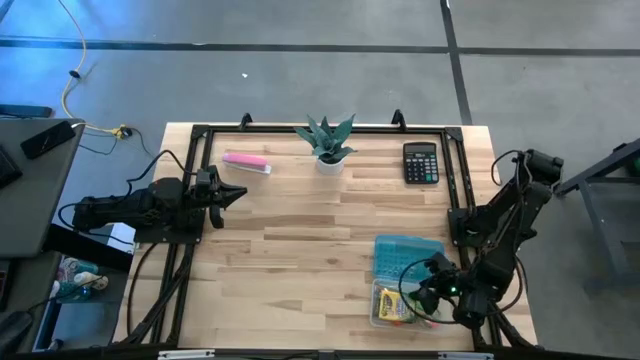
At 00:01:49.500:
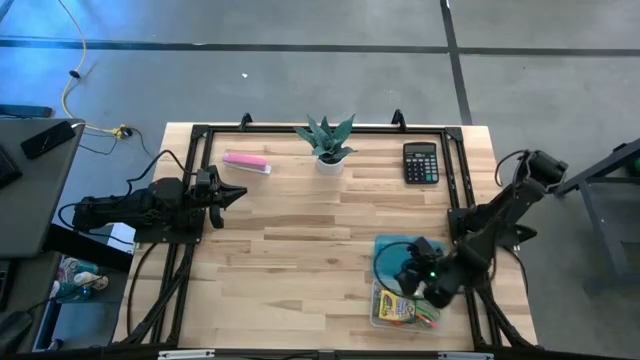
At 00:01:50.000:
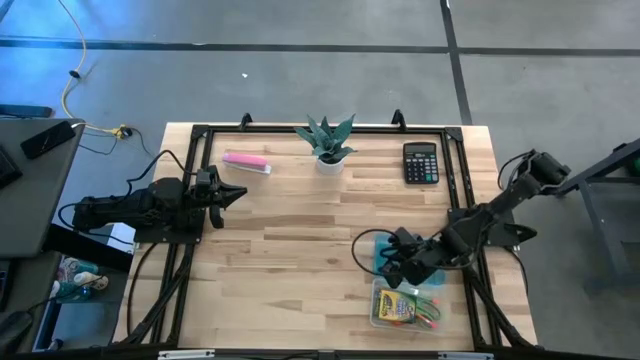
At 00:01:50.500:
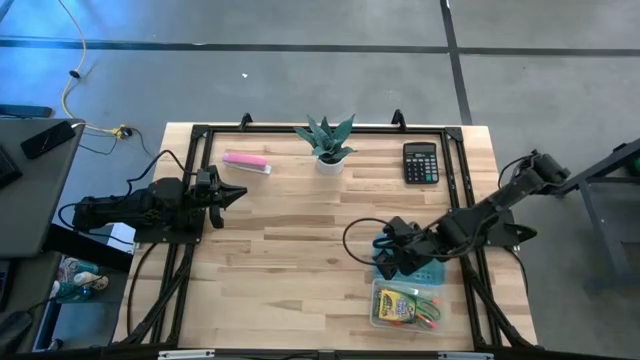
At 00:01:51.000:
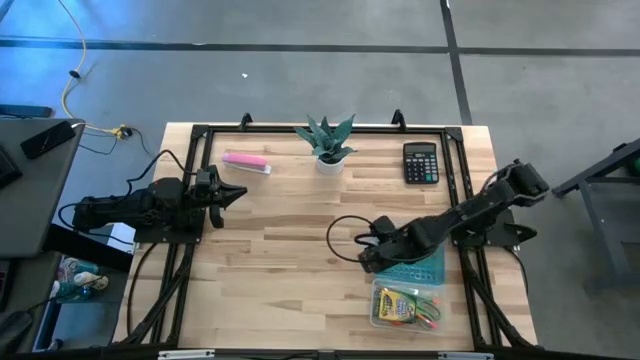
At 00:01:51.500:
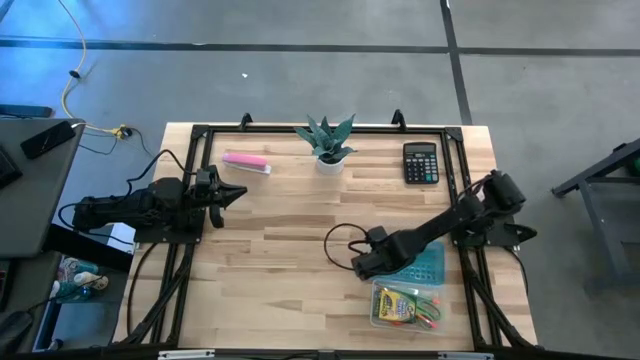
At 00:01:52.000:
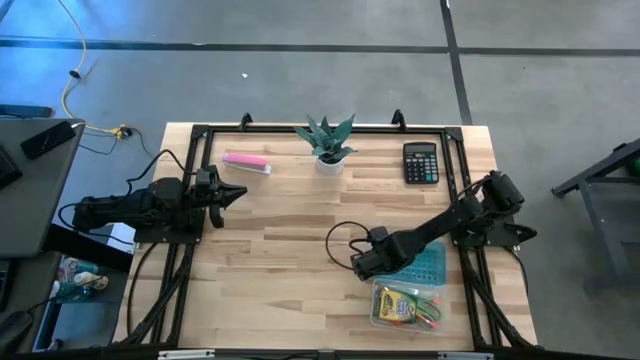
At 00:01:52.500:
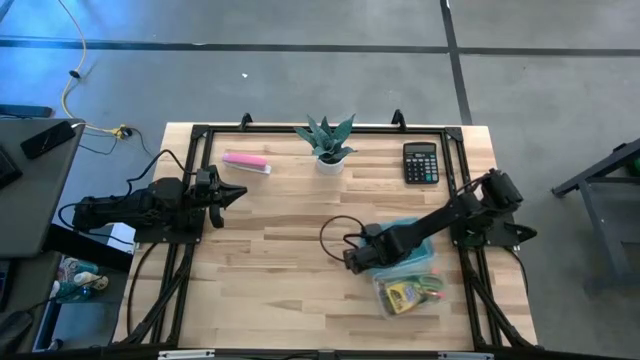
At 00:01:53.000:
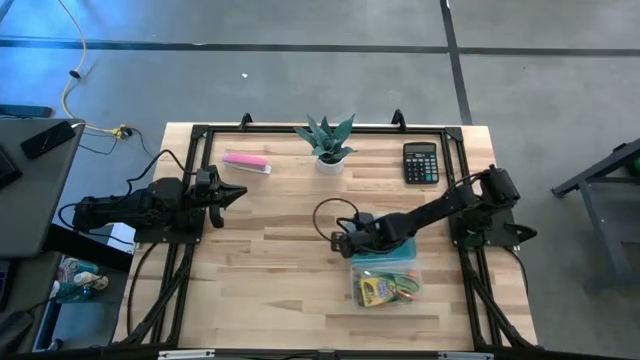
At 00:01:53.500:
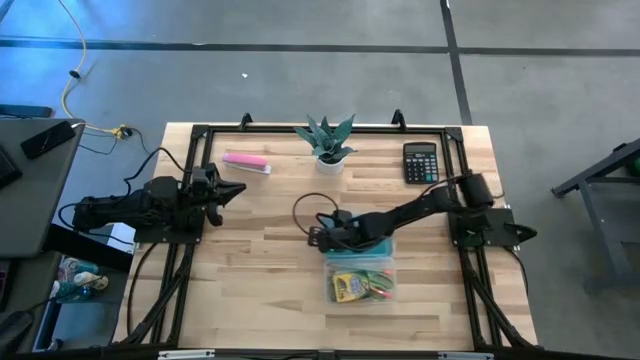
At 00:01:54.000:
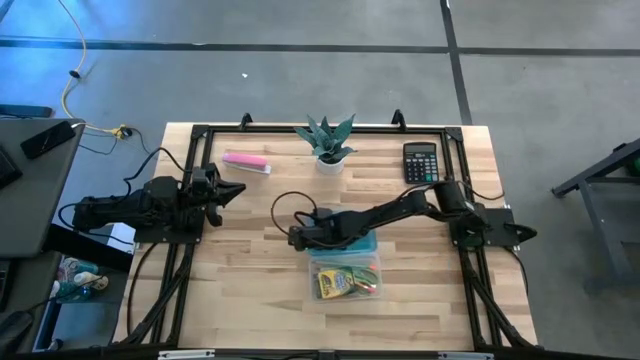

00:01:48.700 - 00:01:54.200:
Task: Pack school essentials
Move the blue supply box to the center table

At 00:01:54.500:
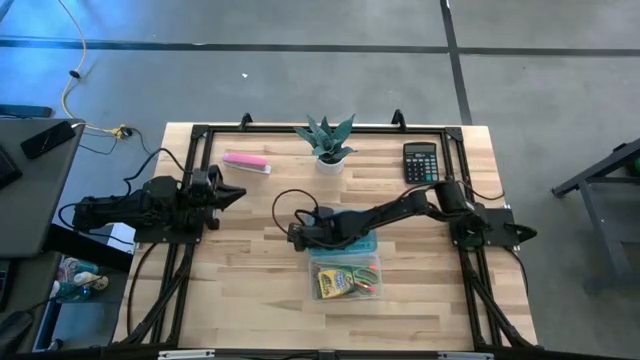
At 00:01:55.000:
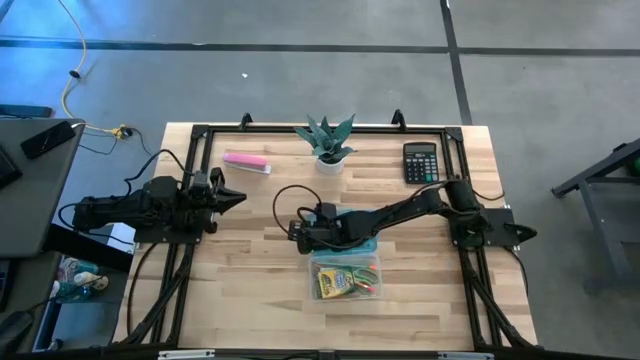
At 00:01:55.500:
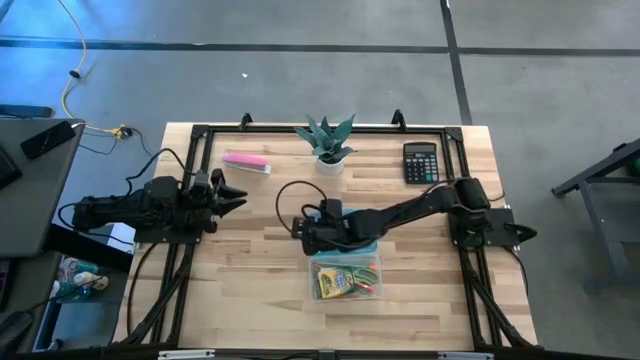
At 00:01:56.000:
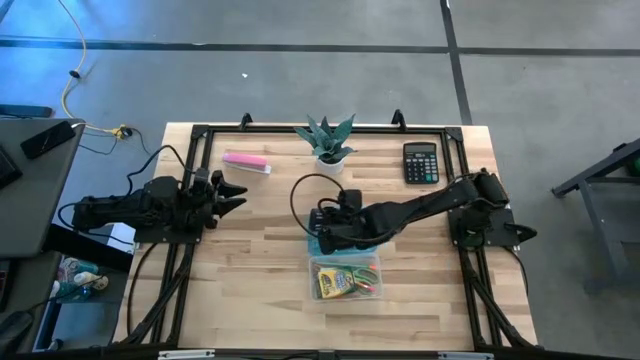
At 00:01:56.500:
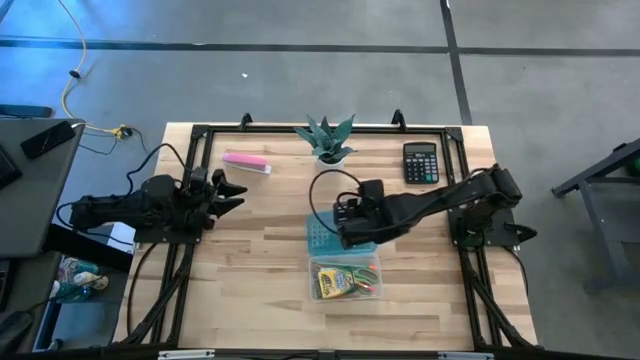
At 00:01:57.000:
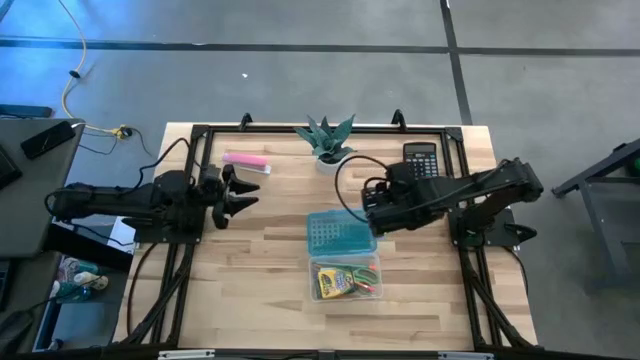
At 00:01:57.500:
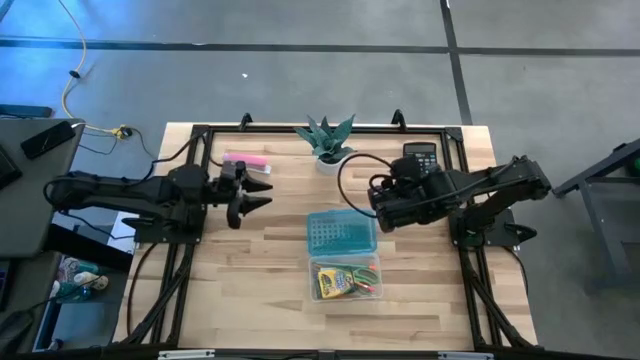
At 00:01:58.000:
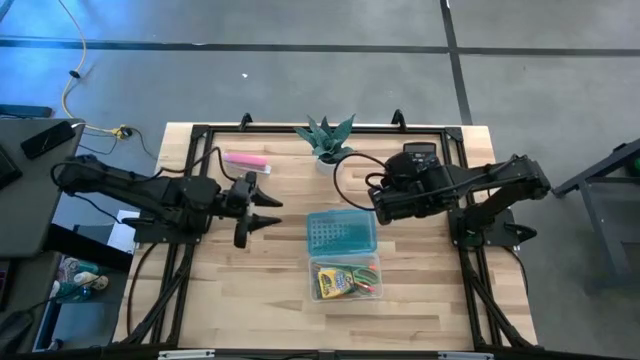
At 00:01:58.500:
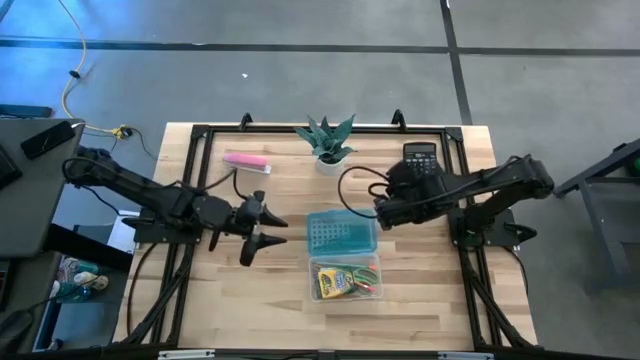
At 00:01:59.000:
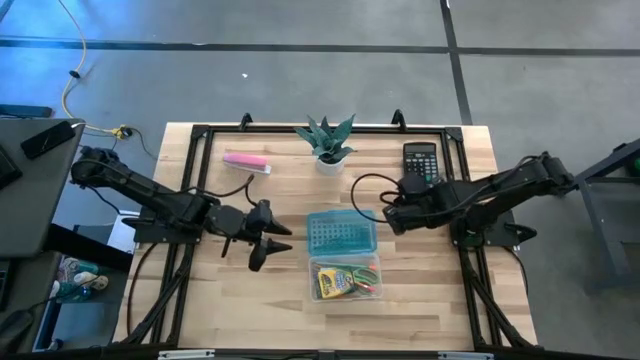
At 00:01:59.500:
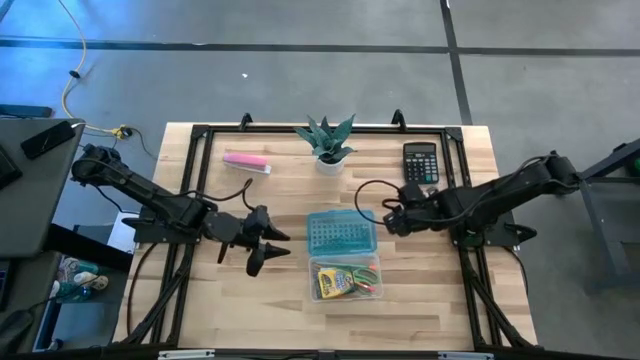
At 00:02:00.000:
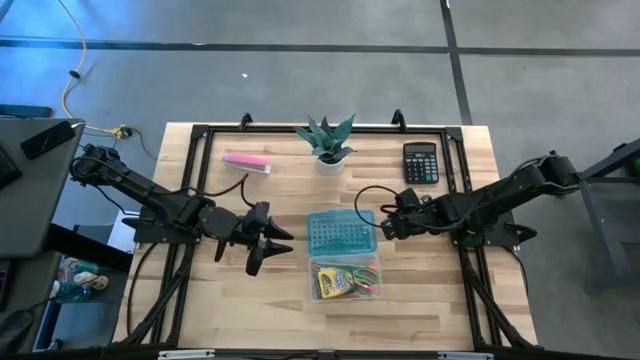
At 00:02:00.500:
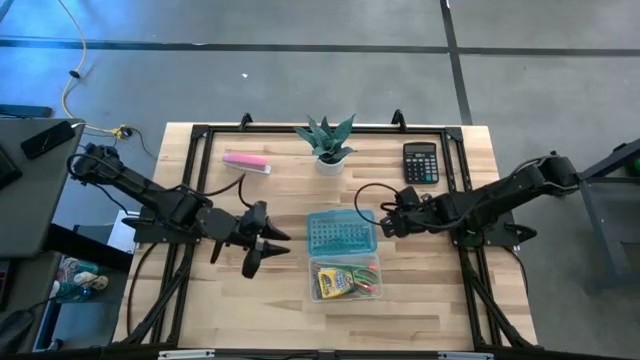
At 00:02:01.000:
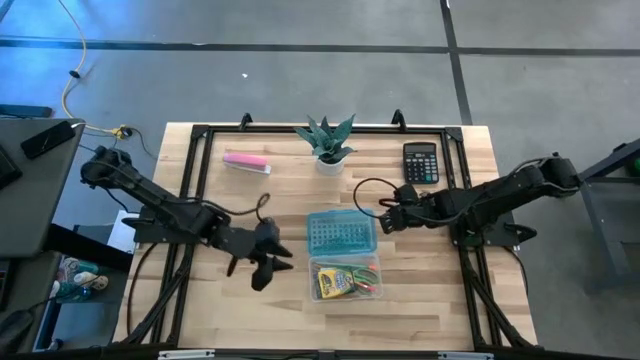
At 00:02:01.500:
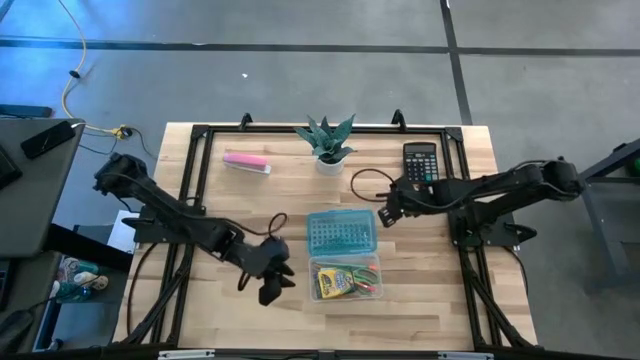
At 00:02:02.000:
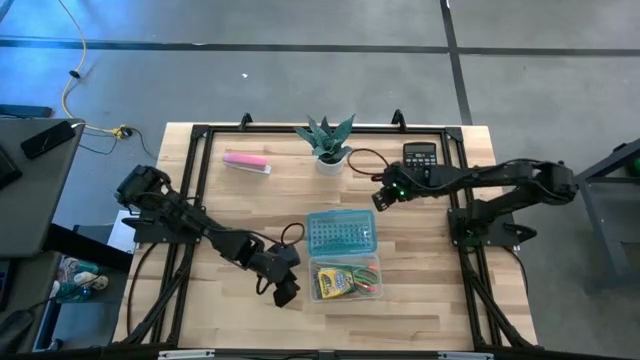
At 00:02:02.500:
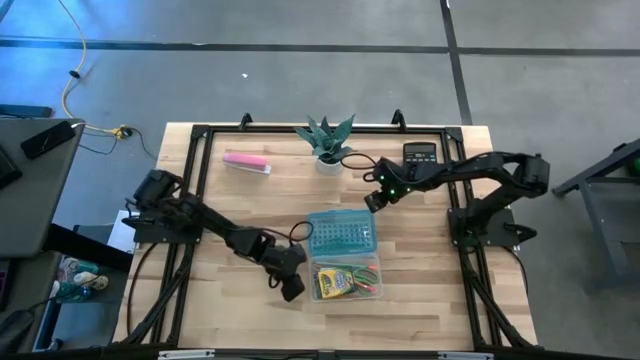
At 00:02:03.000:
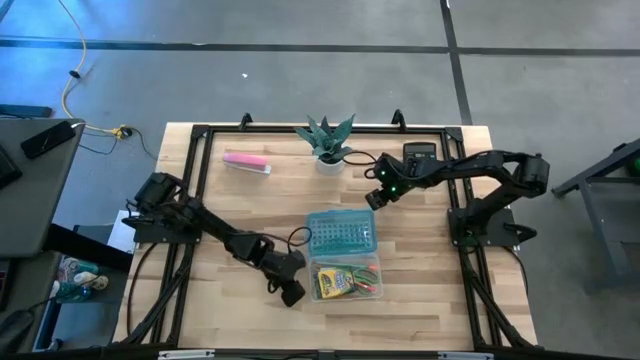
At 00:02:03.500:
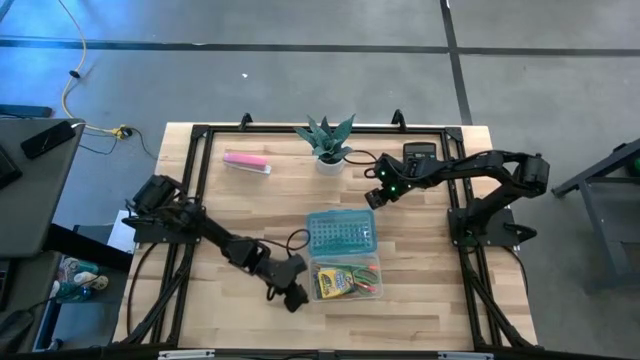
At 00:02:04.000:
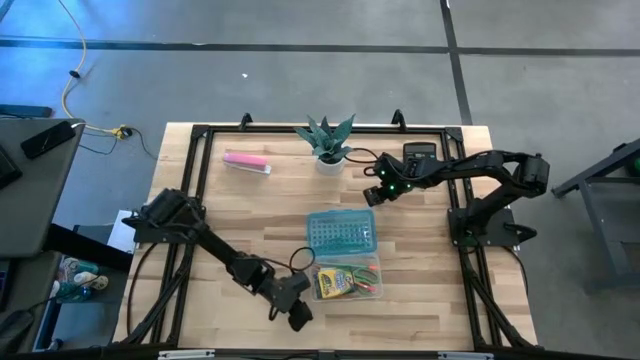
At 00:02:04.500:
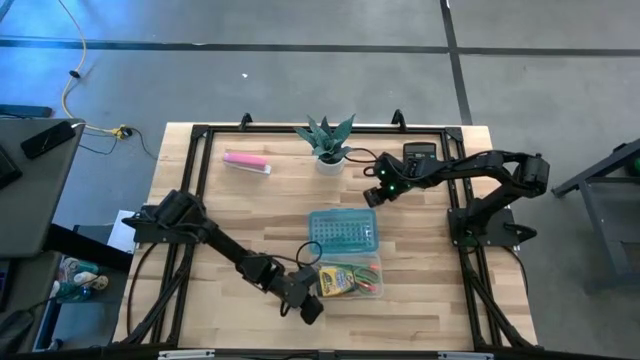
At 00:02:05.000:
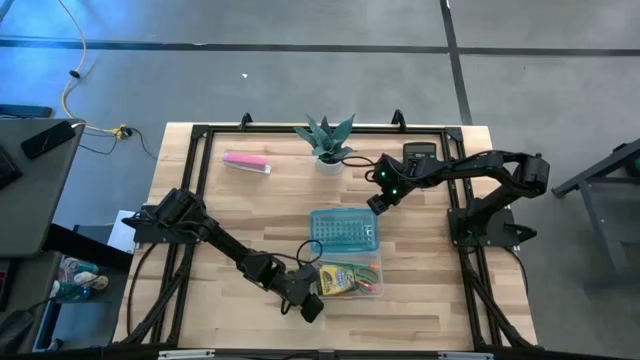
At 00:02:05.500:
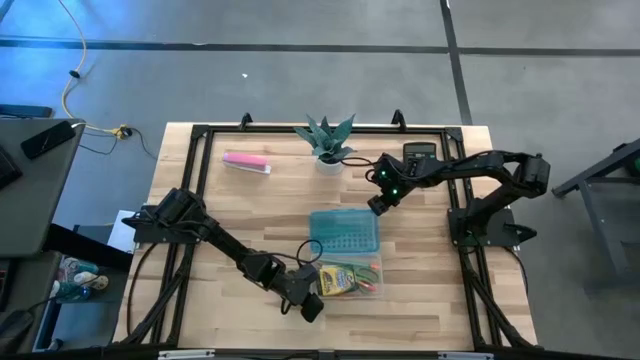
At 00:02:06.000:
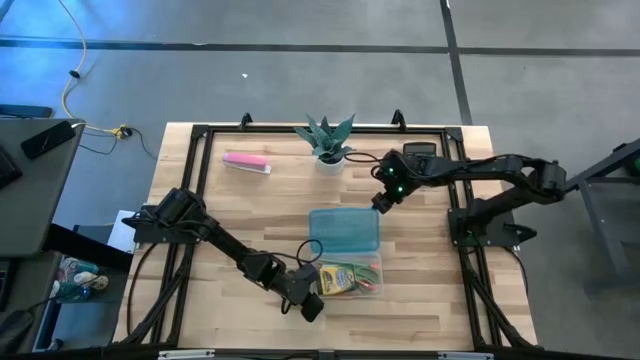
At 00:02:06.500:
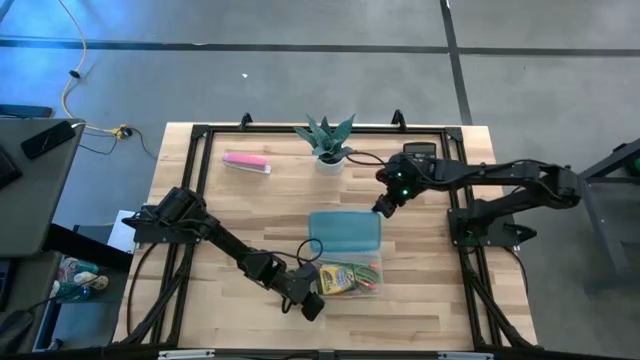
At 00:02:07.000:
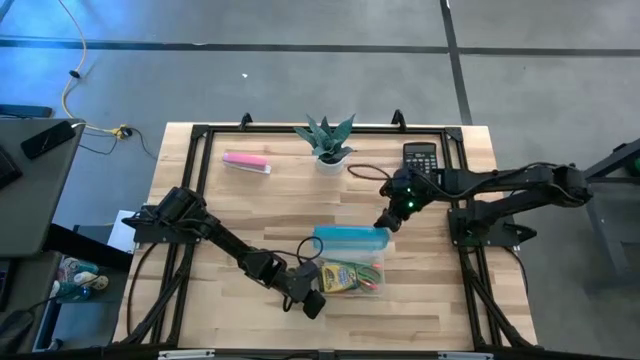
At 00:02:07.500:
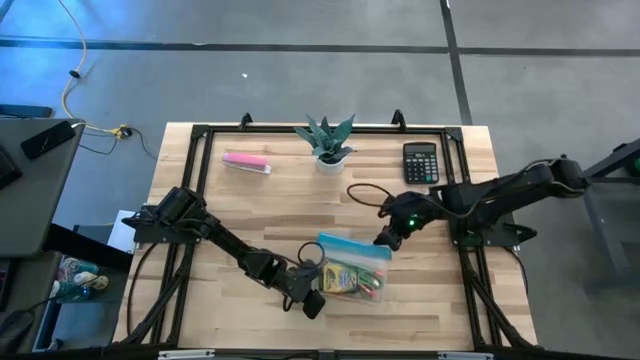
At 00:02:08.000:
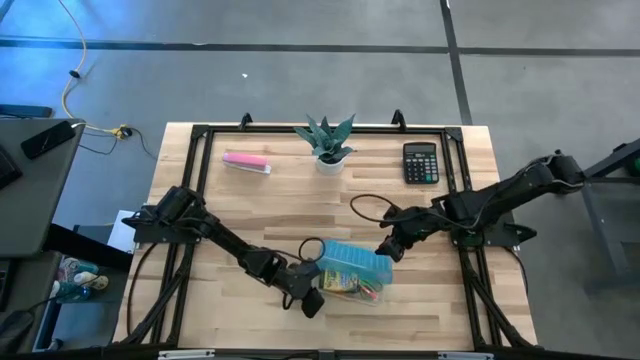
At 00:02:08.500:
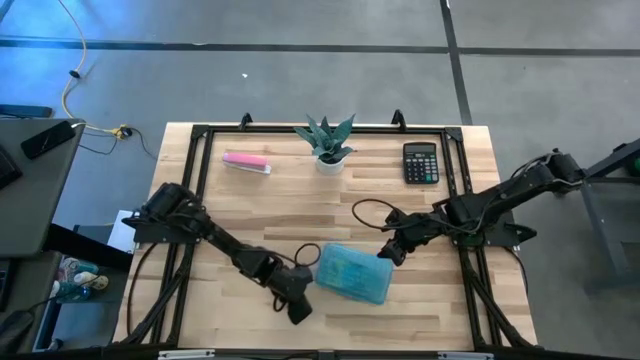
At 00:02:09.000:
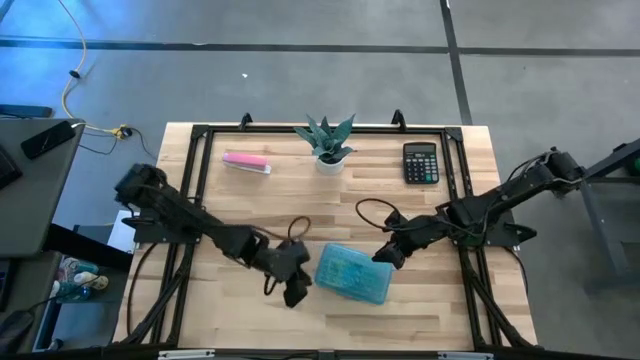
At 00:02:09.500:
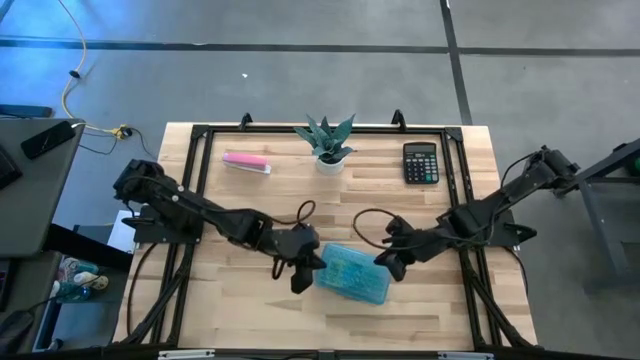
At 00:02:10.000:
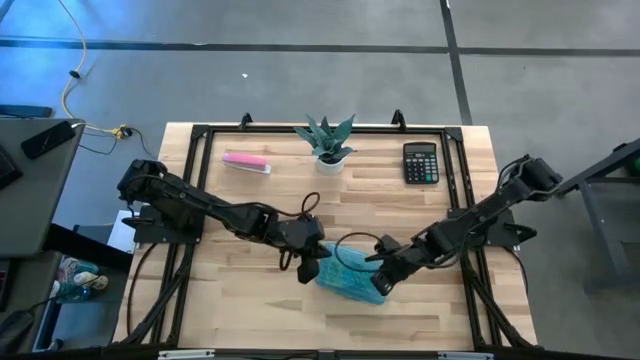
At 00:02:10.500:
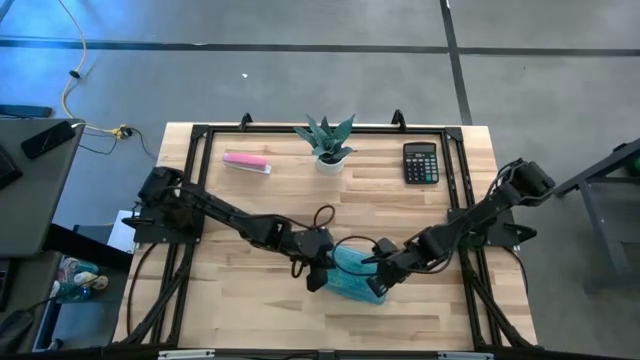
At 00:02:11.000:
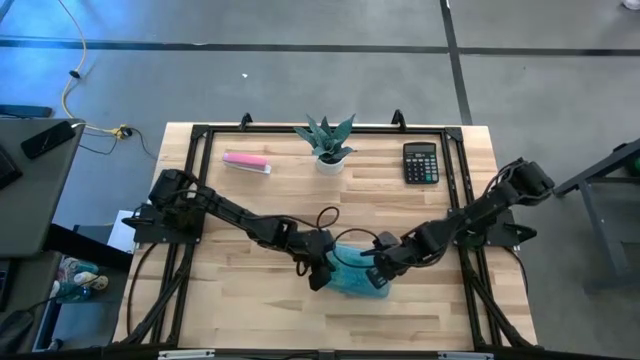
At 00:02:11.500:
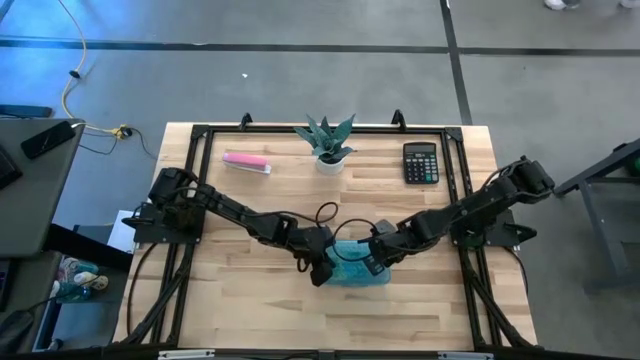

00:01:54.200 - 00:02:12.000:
Close the blue supply box
